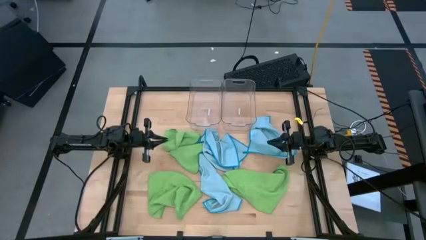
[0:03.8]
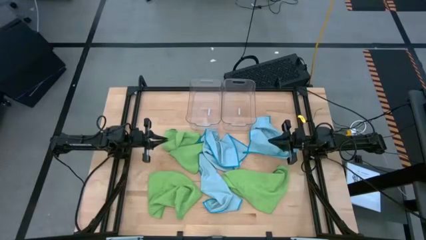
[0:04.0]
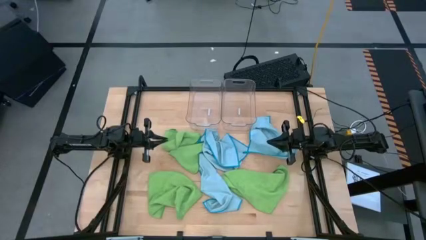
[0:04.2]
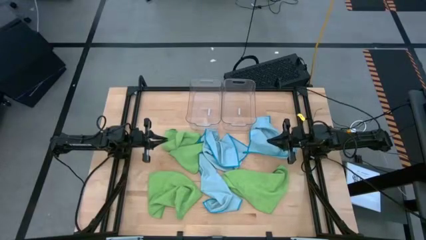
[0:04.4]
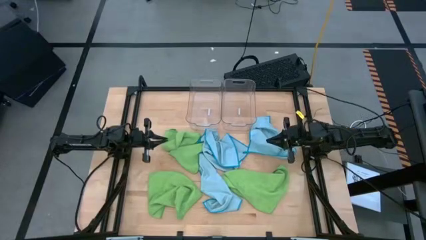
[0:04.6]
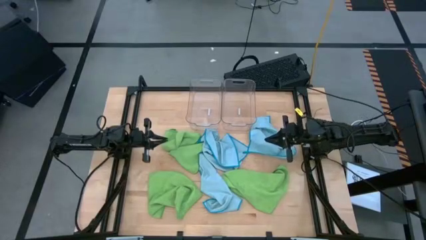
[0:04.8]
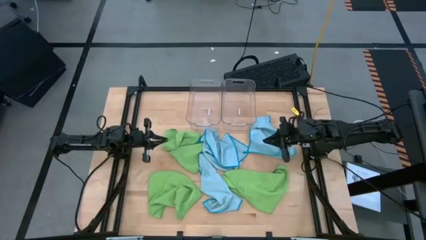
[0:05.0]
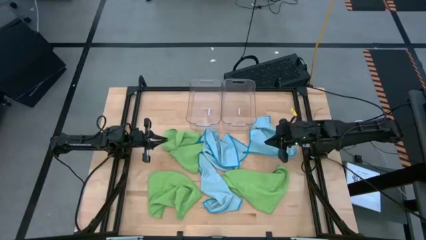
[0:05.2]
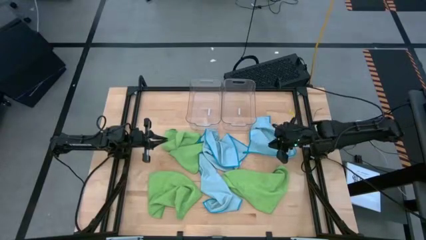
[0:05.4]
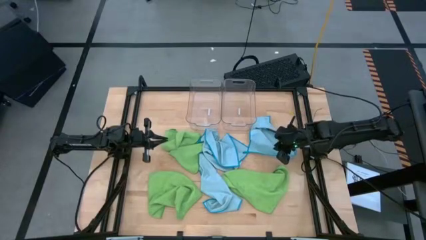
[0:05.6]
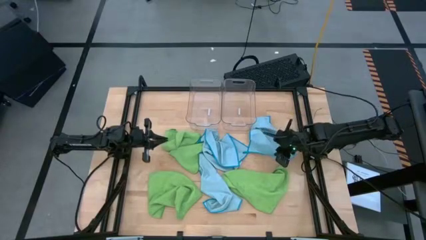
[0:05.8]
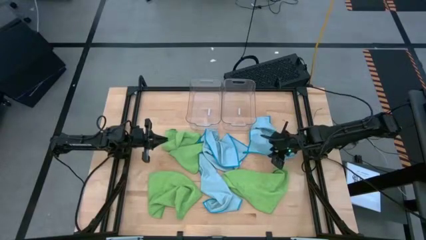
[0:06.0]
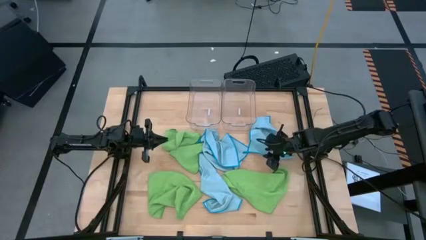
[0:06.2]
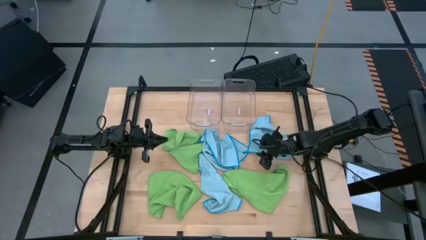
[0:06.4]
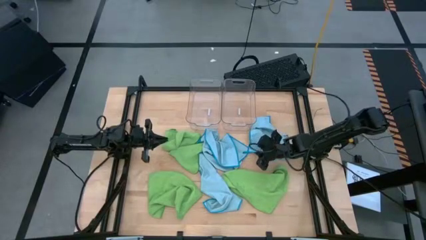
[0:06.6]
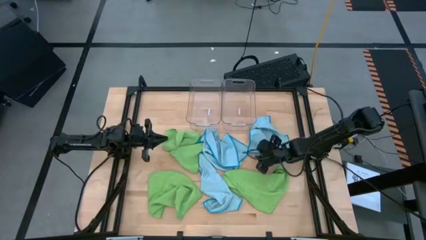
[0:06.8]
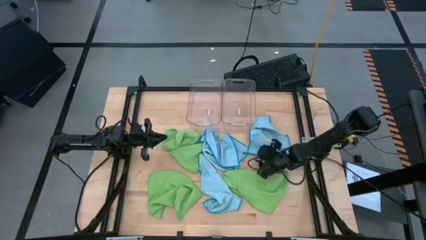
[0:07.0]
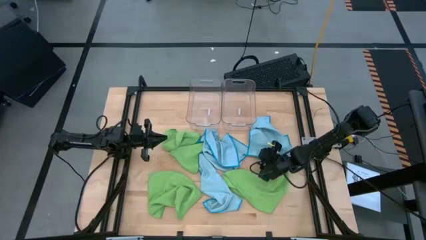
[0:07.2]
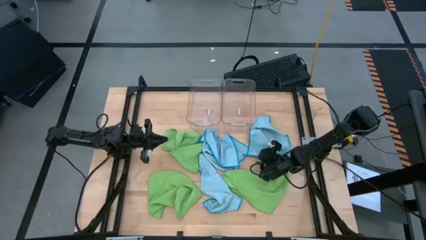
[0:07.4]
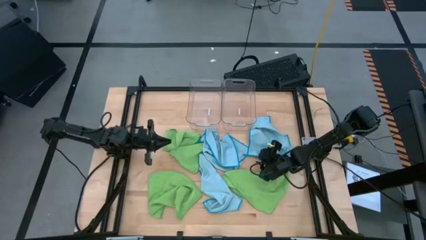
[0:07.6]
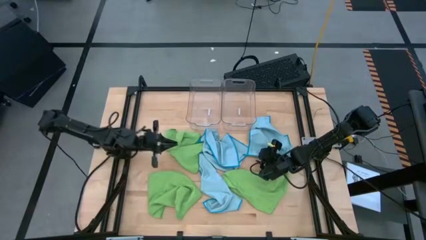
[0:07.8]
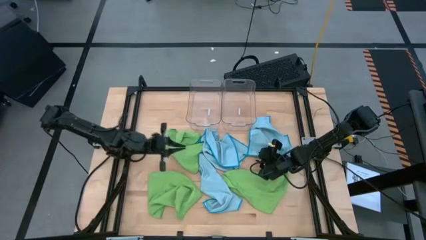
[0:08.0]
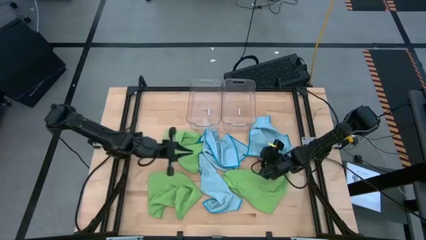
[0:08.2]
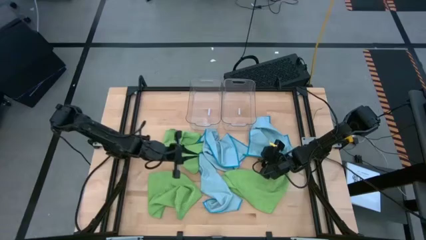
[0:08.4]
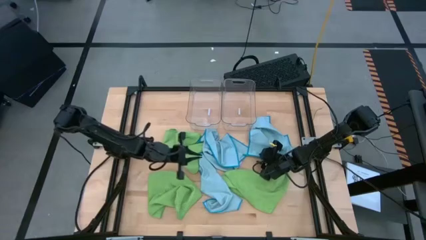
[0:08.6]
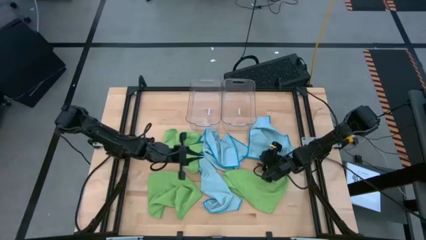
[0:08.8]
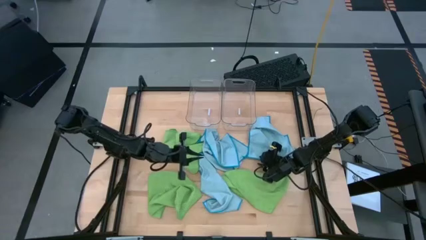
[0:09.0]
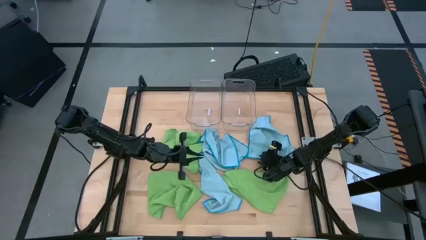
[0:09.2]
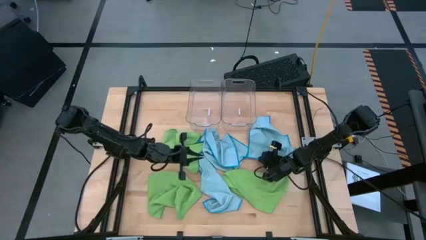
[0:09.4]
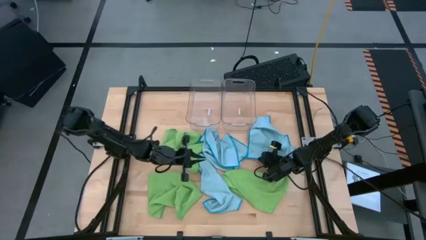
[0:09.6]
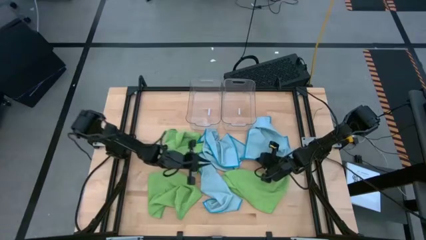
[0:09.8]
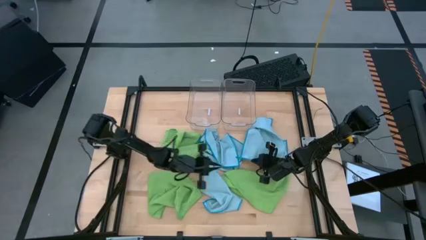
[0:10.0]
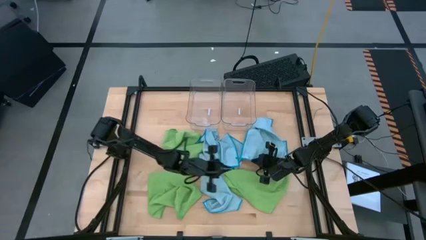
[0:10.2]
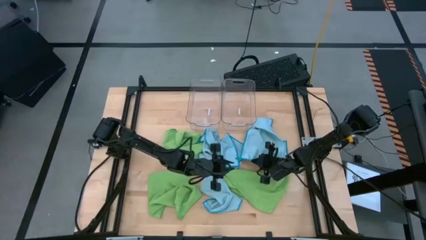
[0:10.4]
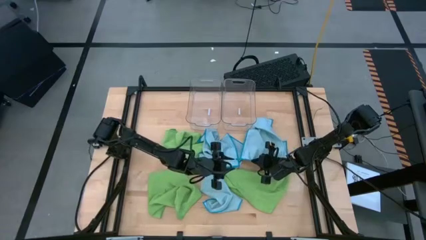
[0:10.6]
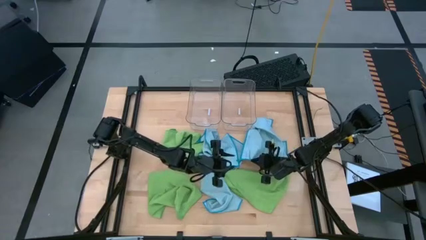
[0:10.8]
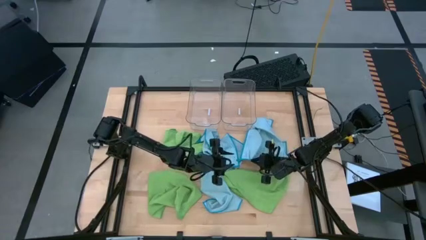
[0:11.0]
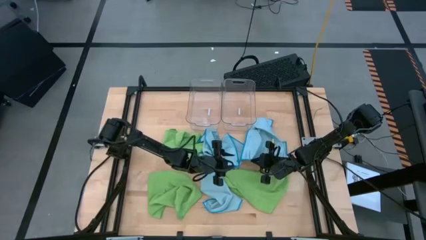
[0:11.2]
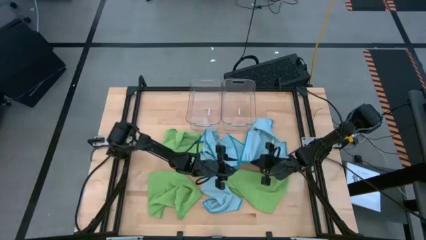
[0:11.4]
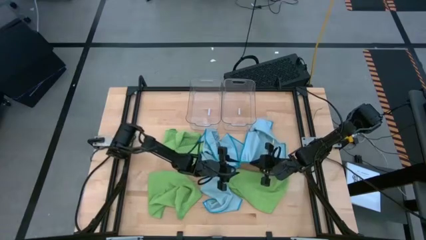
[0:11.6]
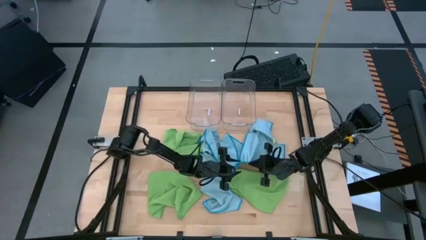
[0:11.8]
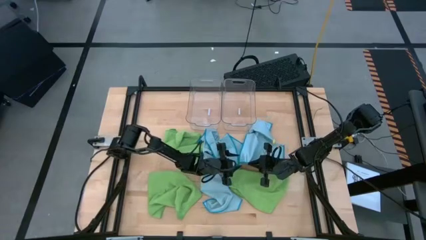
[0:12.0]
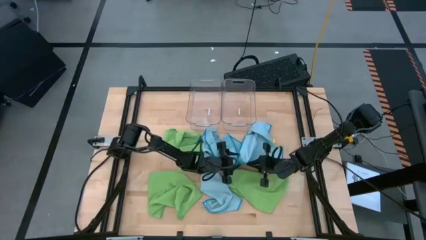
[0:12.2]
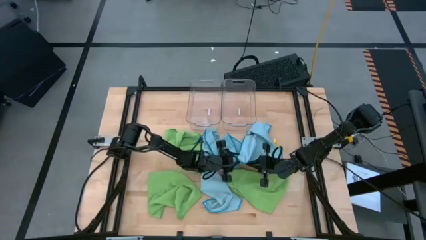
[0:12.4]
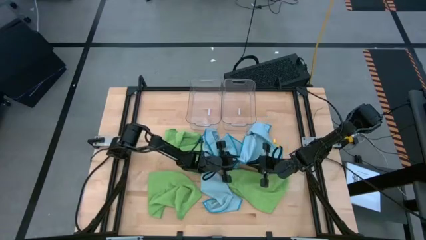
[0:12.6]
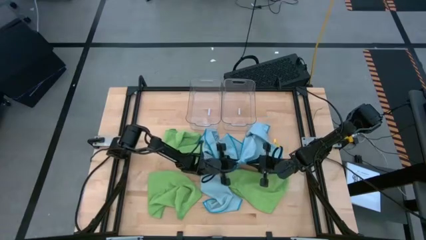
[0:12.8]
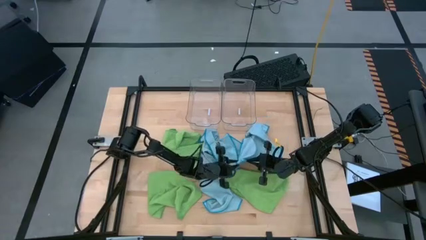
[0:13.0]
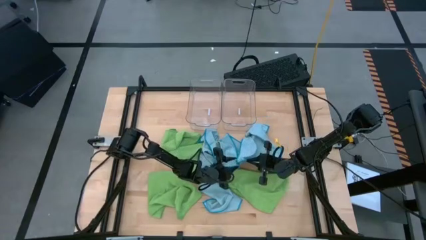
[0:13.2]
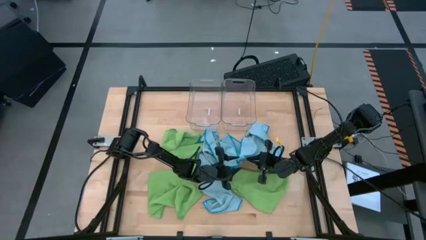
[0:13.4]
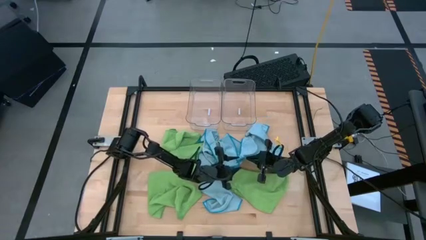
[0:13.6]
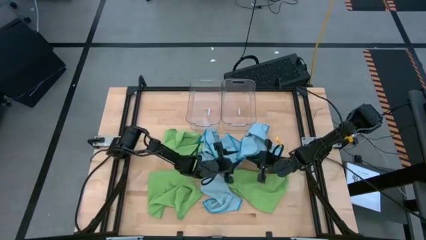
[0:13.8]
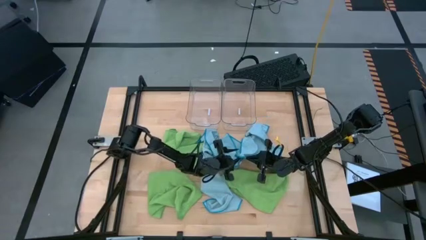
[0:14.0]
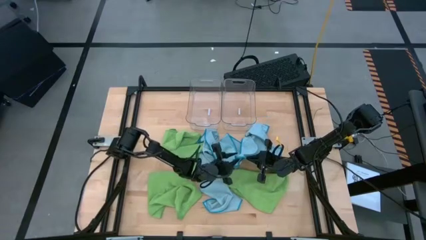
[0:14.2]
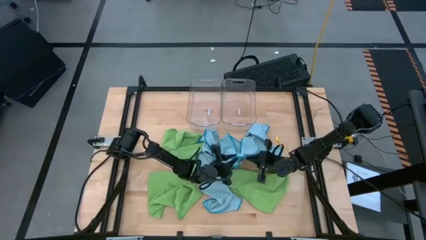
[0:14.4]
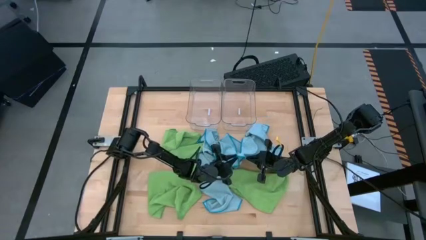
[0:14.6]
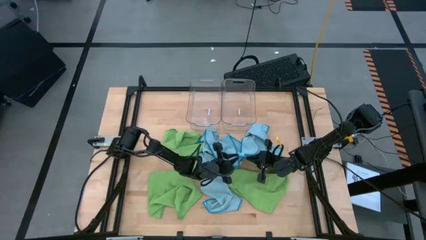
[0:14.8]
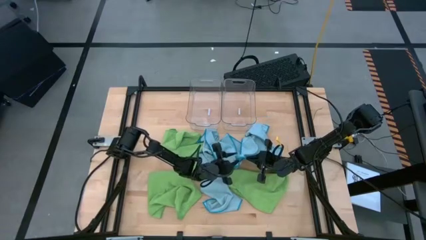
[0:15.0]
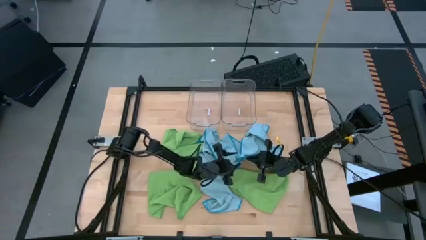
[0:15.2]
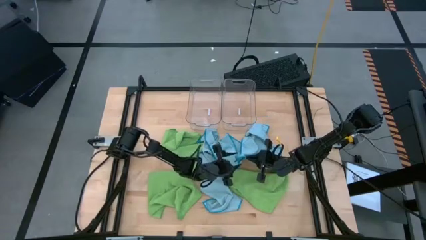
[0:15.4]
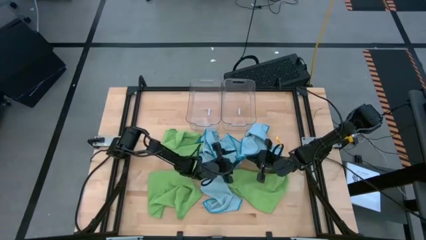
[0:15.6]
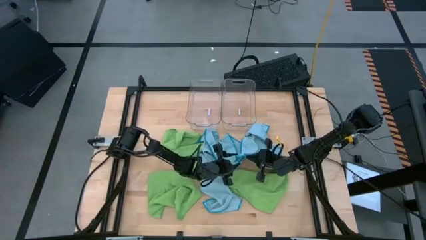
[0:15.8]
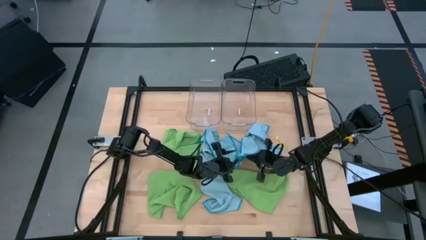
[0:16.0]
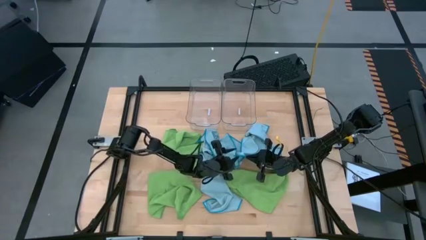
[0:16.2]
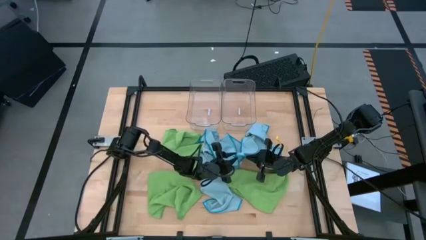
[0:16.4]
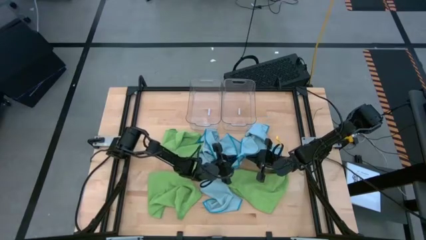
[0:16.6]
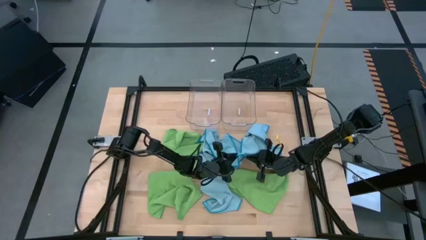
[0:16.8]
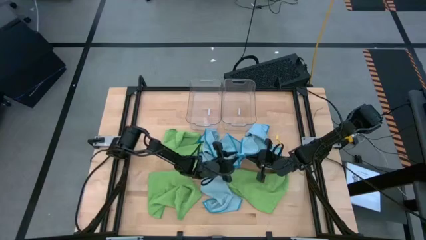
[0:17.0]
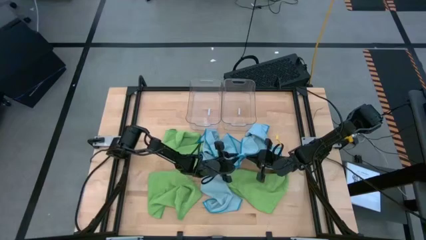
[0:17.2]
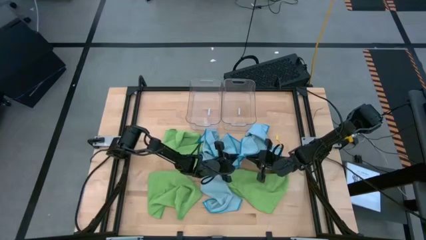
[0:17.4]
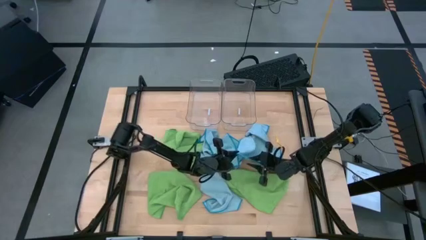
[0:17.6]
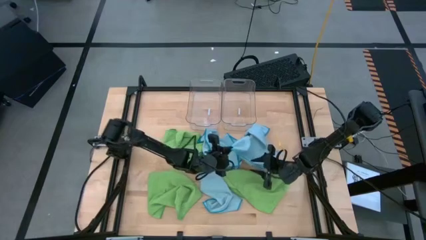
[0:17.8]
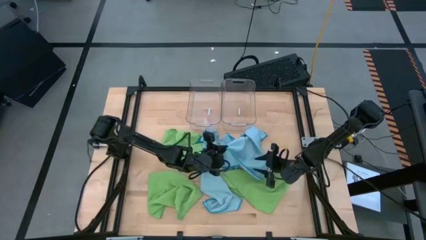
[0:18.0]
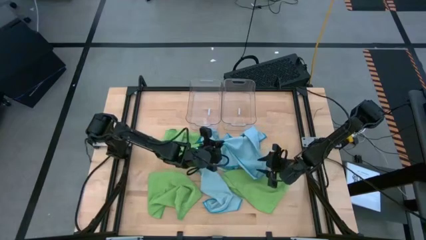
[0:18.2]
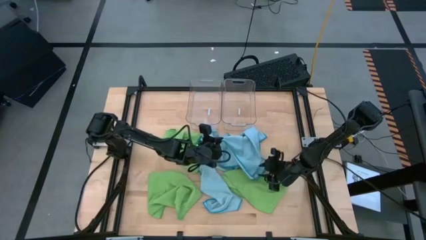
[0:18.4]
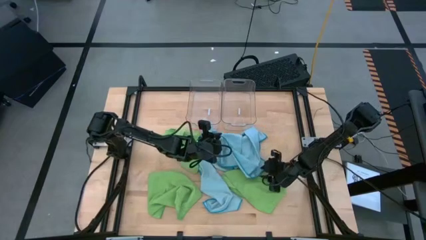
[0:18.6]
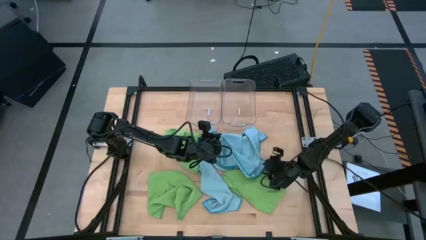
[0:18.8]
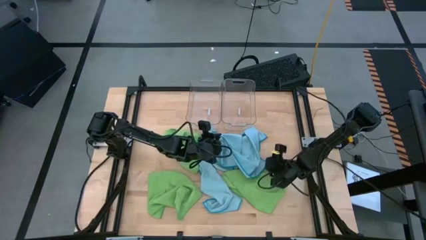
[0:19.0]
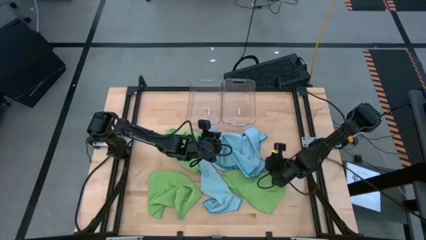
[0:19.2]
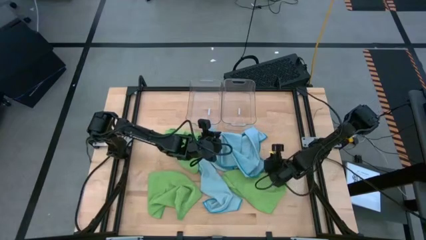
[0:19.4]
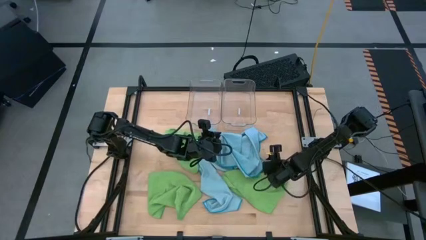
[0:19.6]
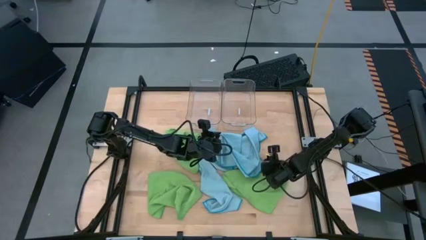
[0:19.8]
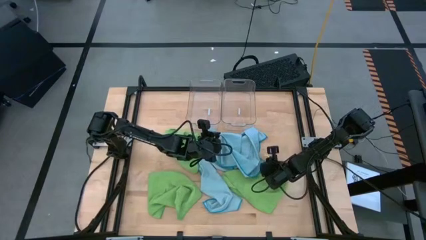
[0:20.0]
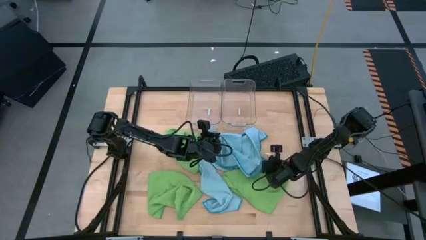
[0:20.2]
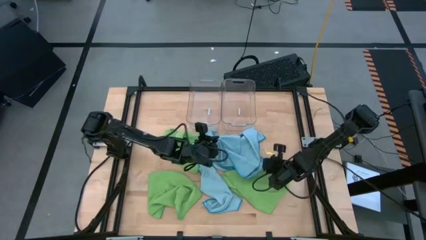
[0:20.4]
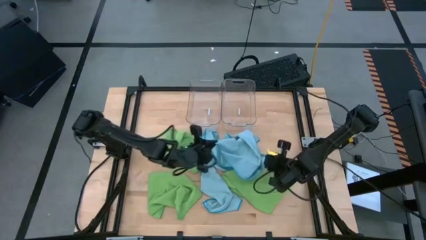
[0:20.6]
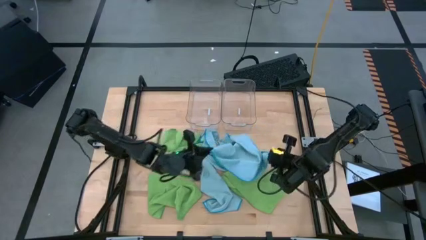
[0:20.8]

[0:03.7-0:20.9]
Task: Fold microfiber towels
Fold the top right blue microfiber towel
